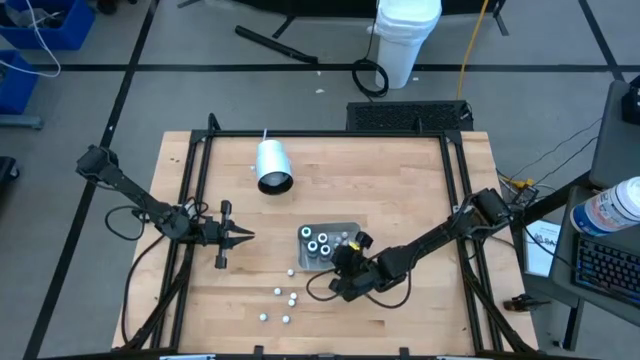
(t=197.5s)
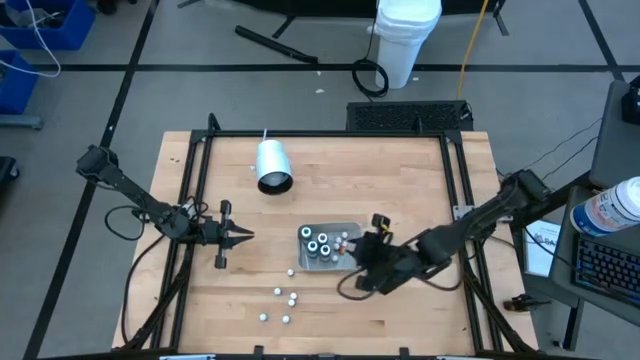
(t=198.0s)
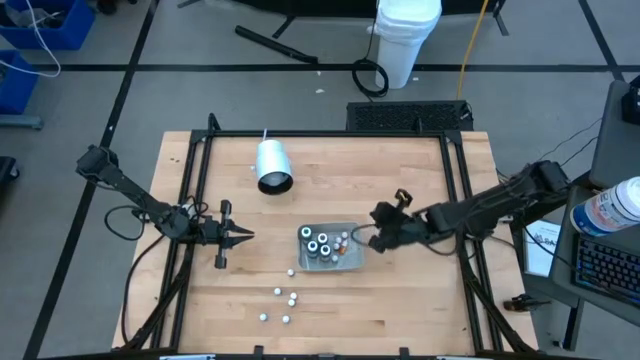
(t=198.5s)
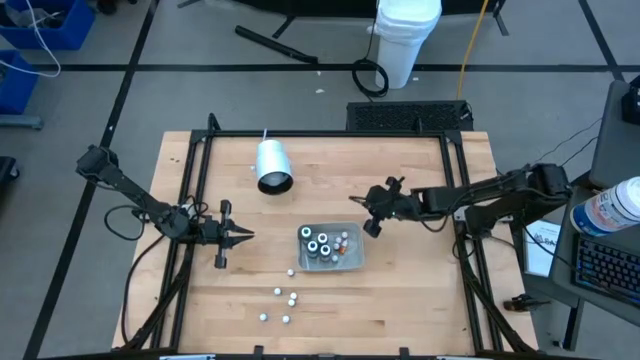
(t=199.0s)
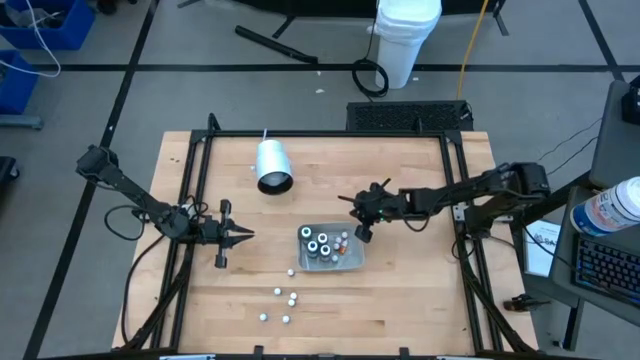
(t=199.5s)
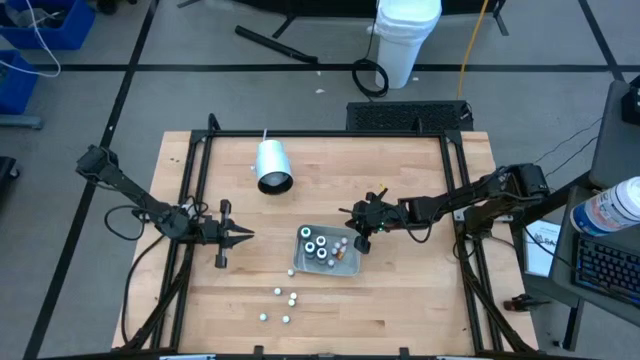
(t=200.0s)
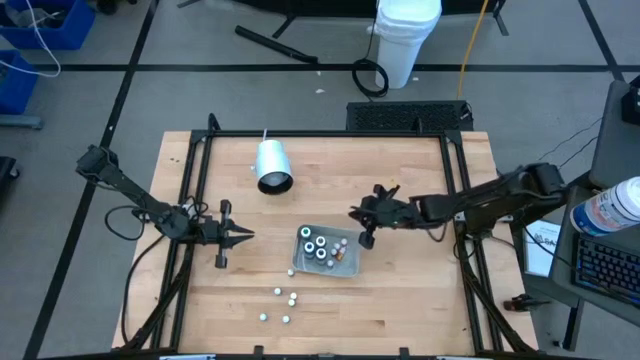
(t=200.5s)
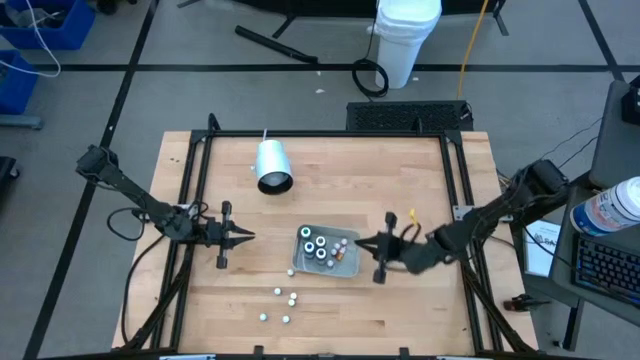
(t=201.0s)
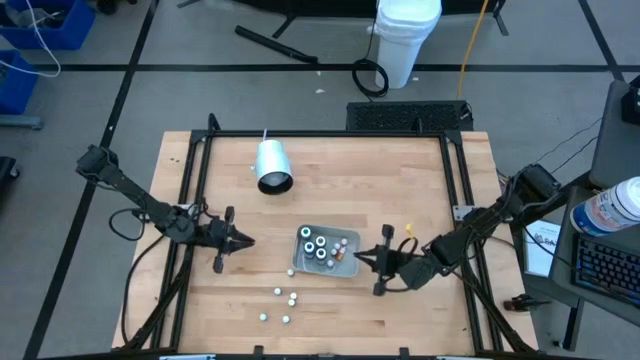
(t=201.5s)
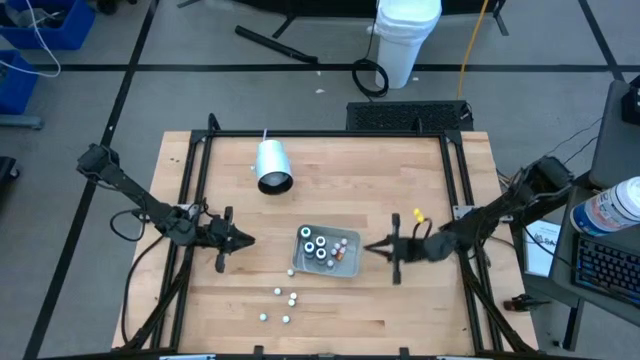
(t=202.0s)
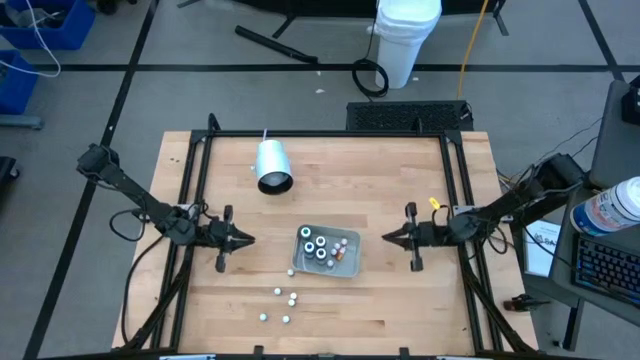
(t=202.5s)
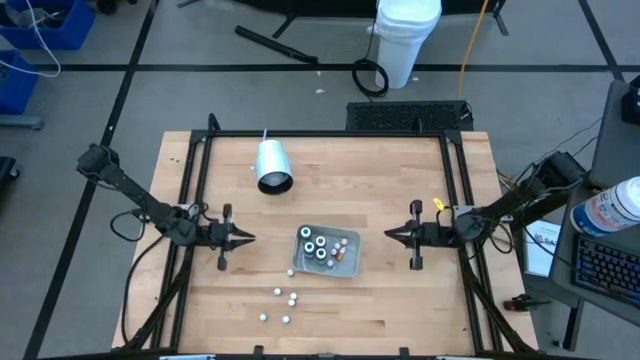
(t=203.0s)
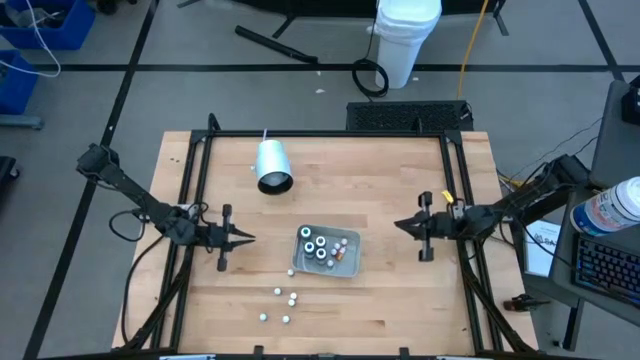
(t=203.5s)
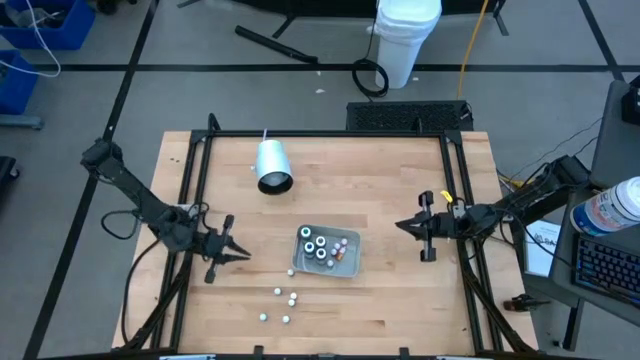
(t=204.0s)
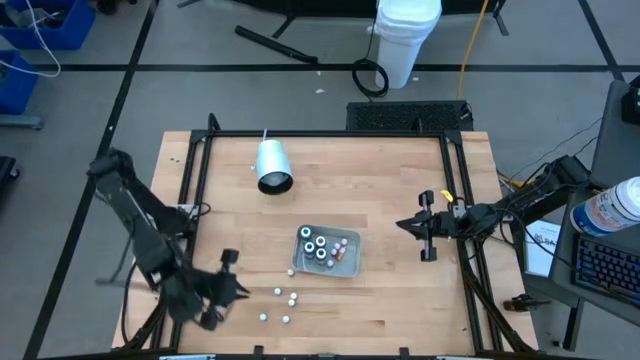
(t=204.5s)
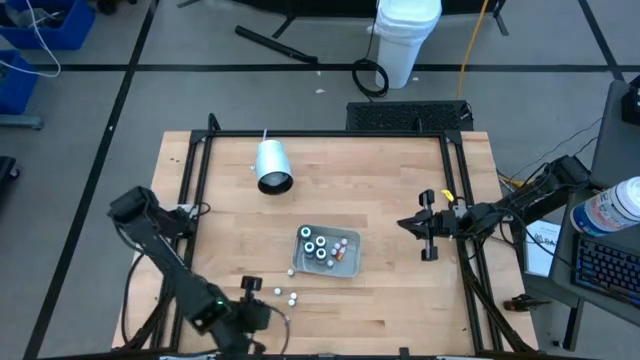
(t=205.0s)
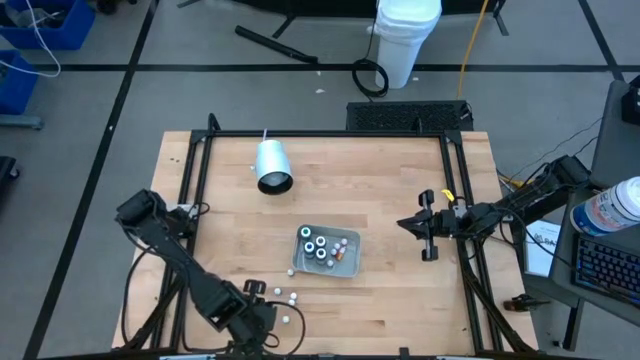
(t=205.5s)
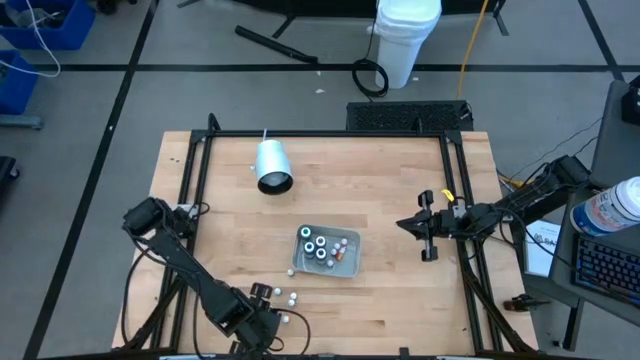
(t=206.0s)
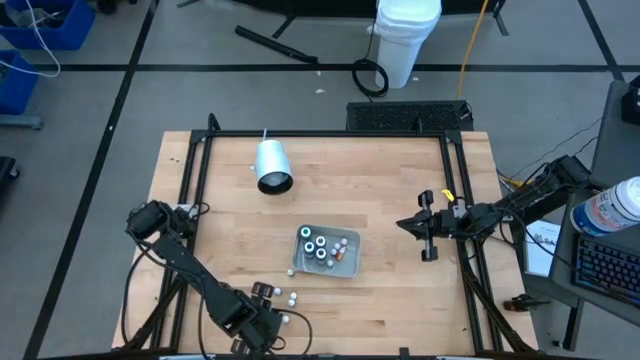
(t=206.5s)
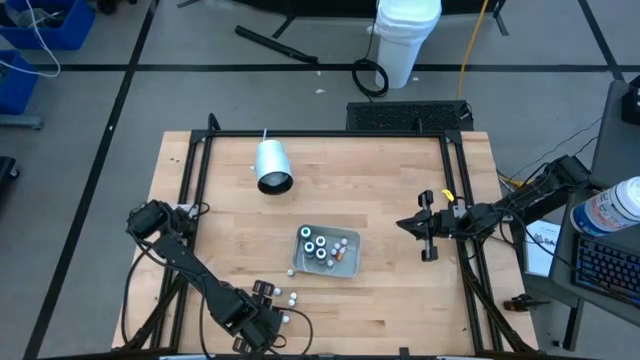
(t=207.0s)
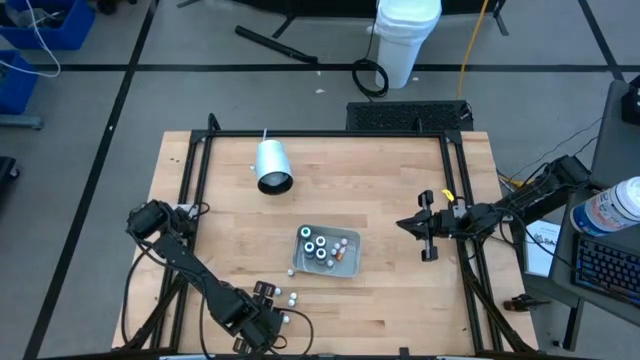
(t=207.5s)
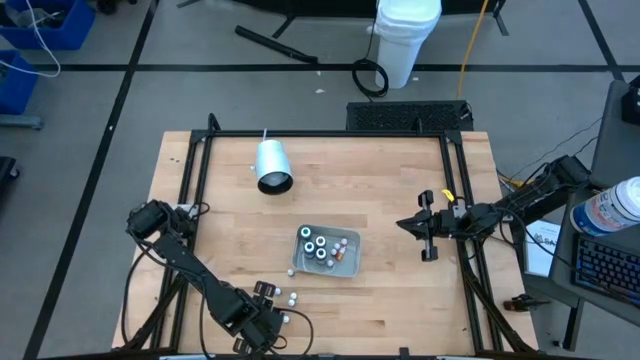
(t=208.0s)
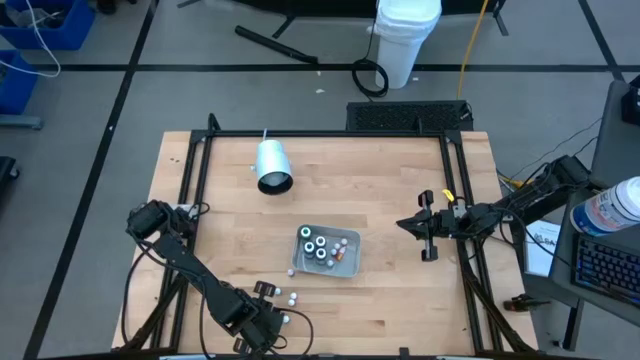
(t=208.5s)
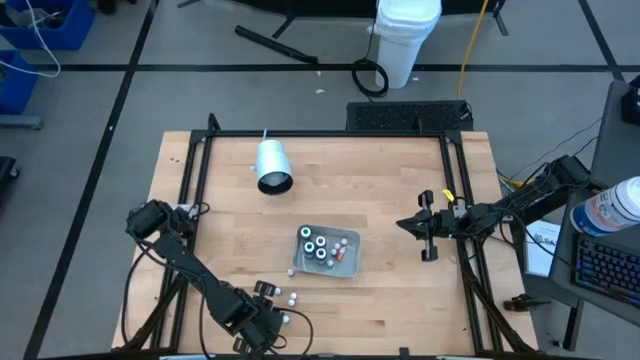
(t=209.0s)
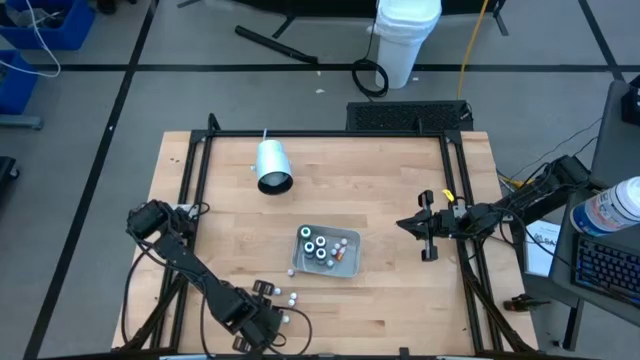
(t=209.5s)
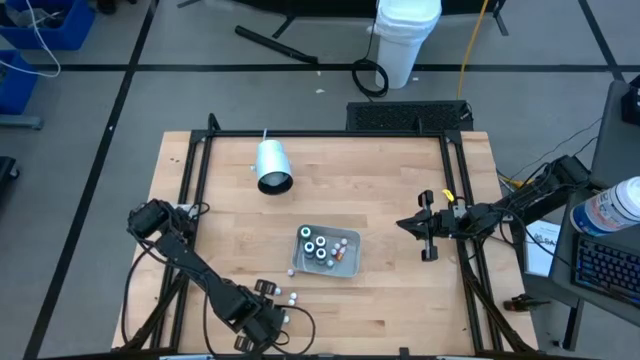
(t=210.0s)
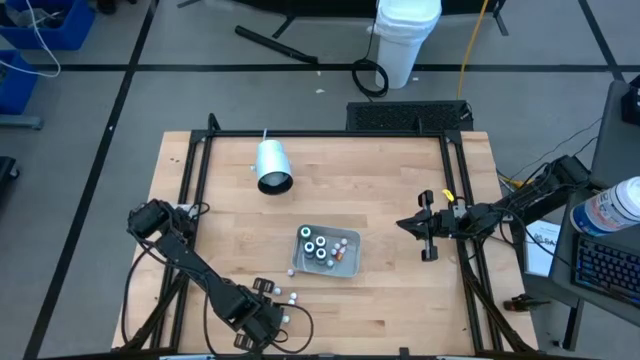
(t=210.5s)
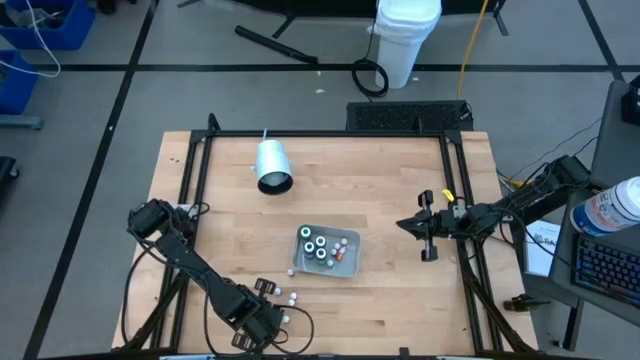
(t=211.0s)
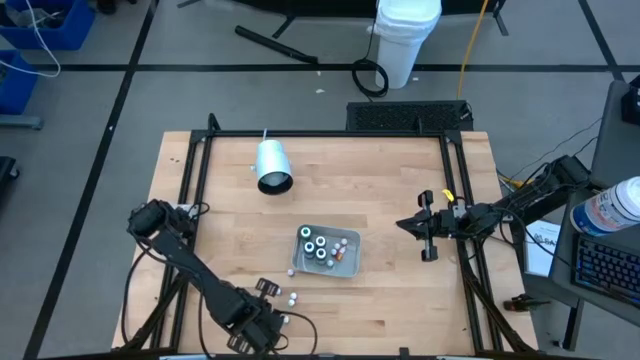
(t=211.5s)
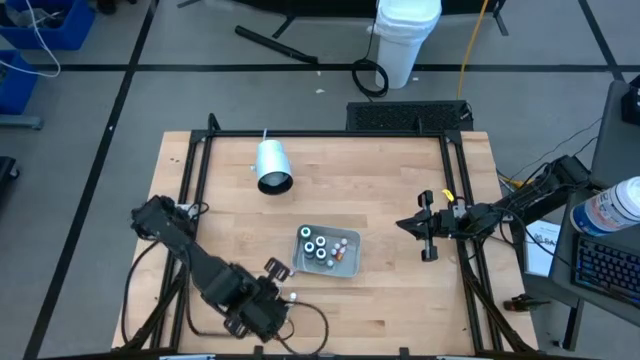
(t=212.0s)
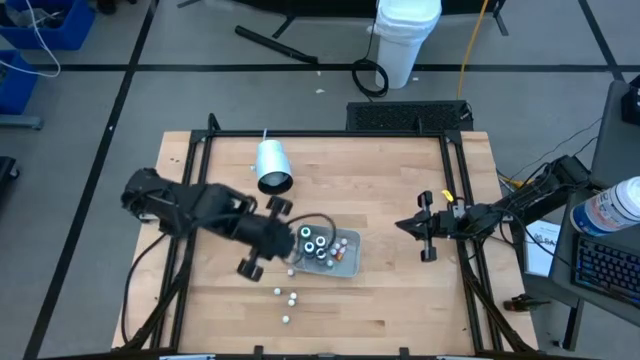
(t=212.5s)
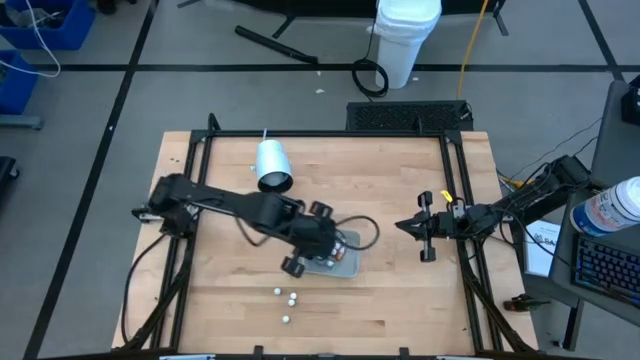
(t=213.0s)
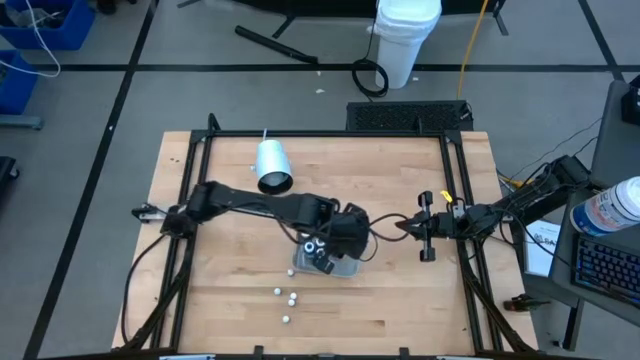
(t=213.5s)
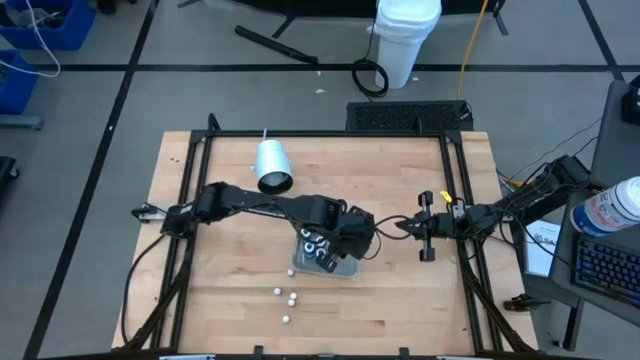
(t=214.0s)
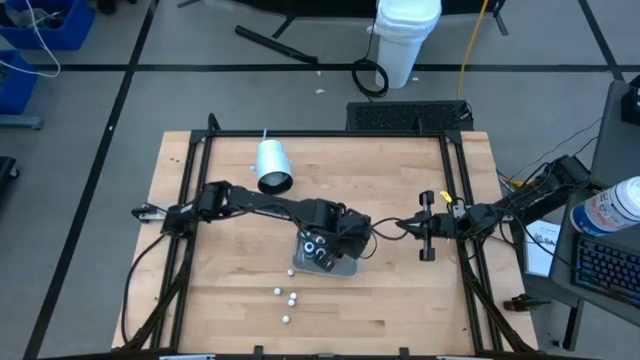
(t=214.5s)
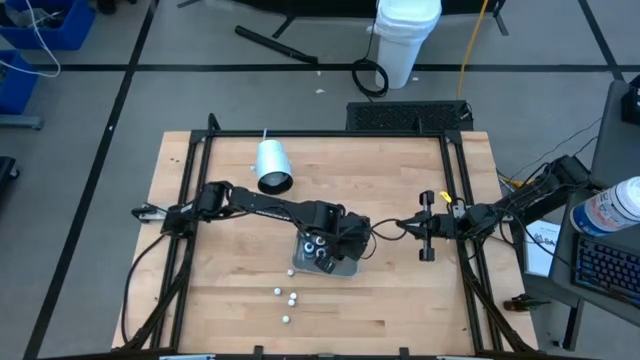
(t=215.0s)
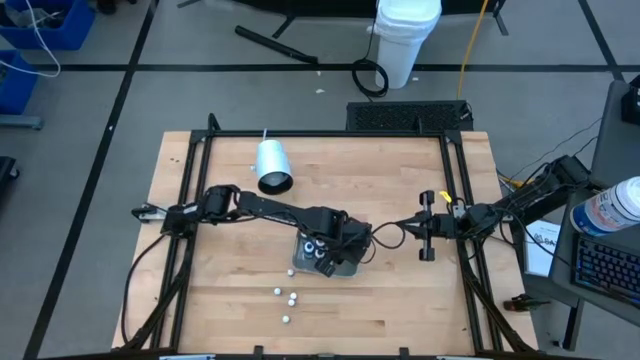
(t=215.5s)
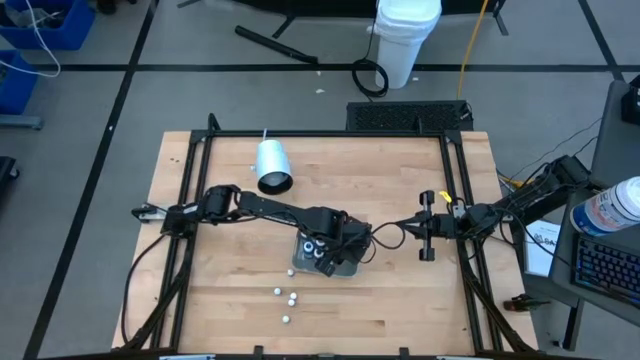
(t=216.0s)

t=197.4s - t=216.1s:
Task: Pick & Place food coloring
Put the black food coloring bottle into the gray bin
